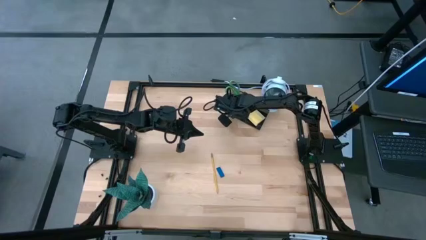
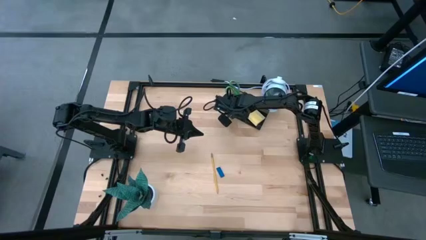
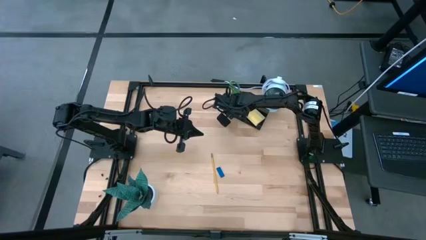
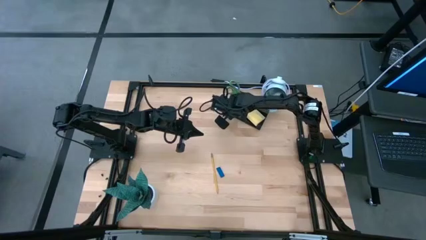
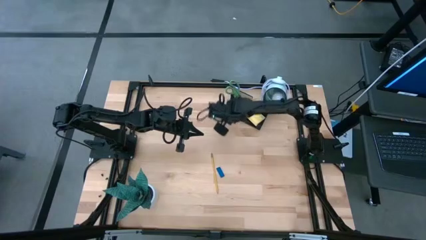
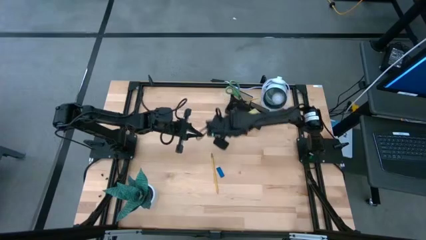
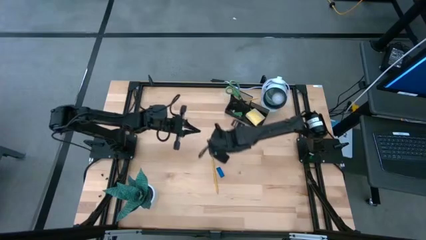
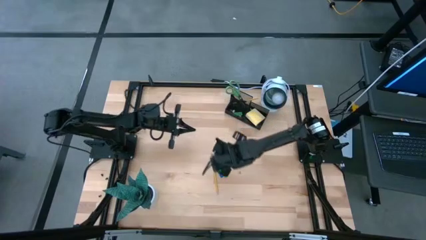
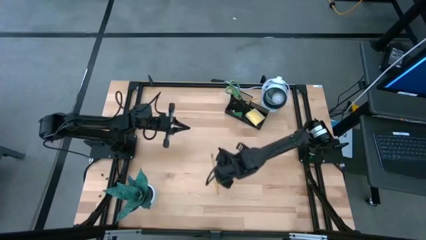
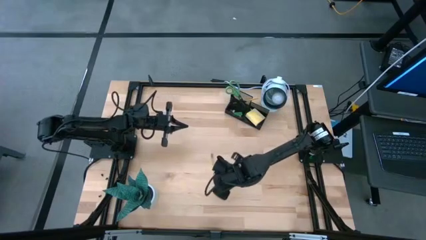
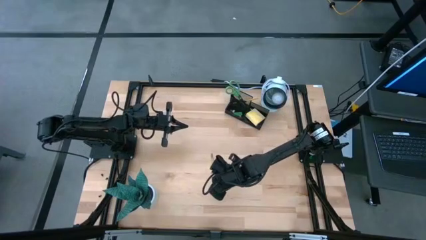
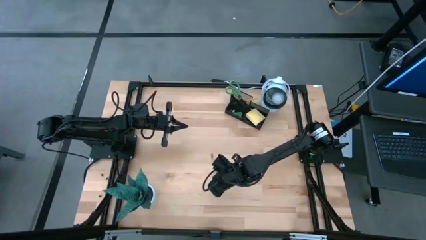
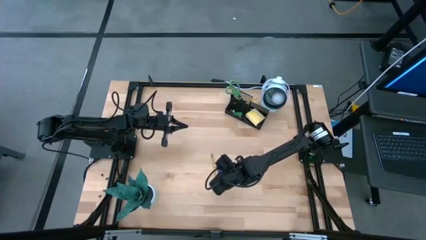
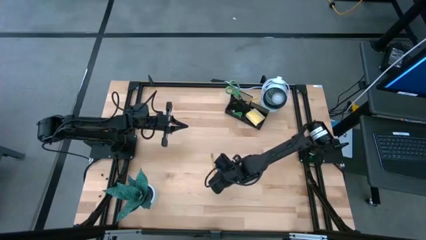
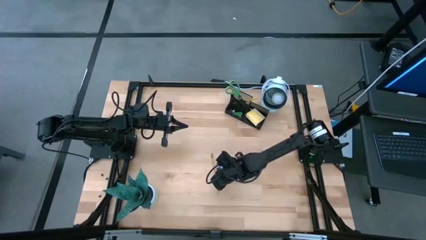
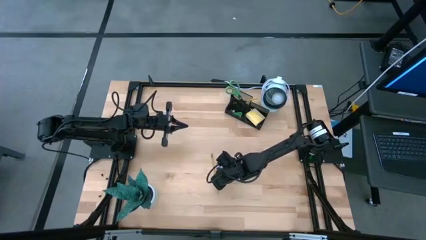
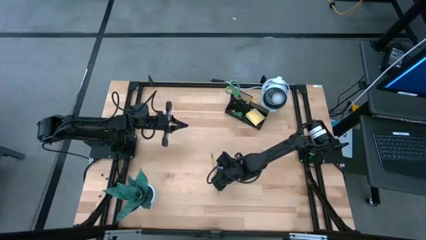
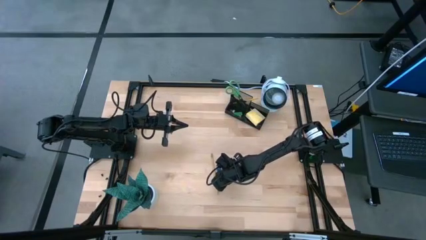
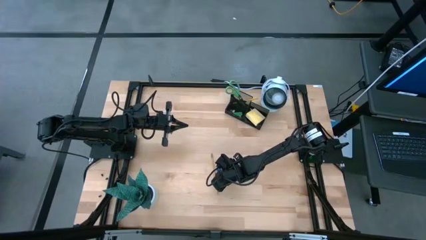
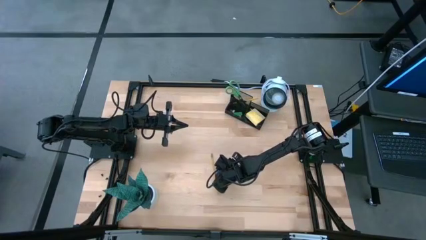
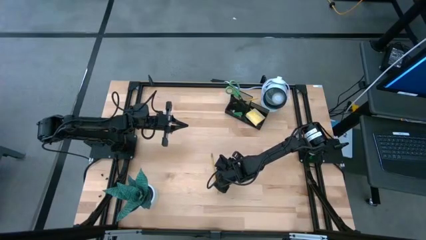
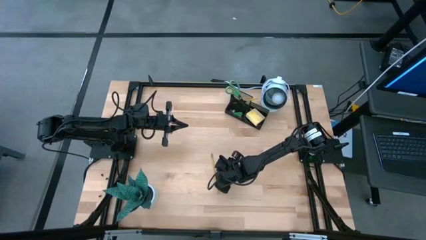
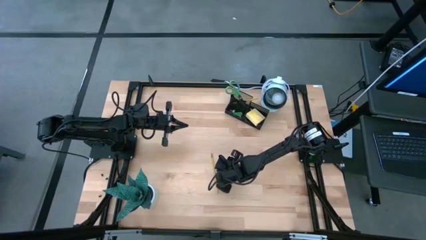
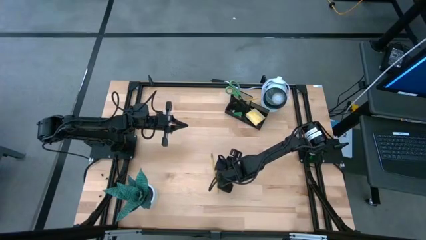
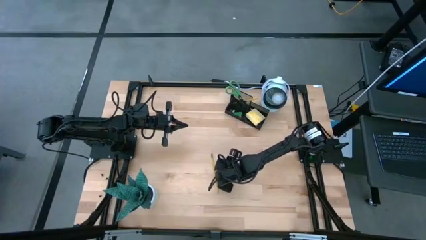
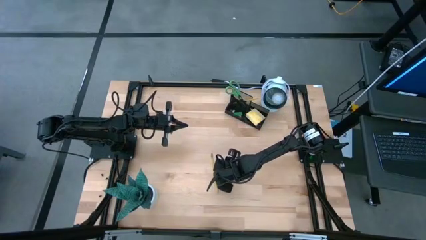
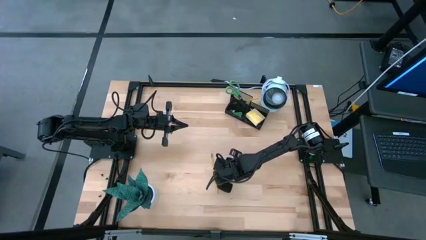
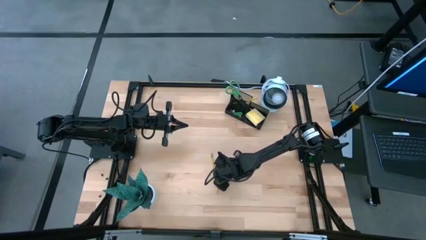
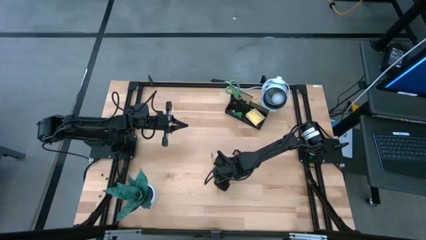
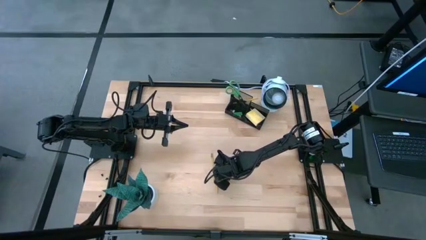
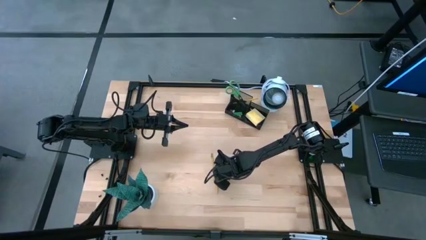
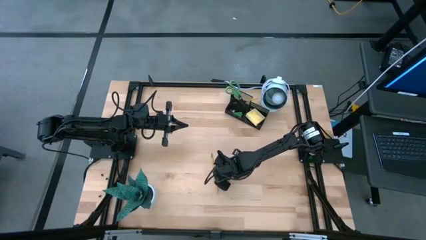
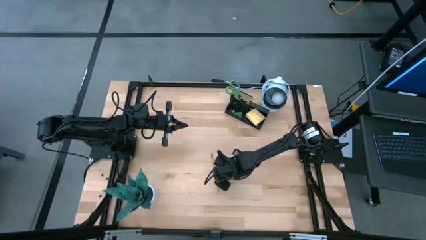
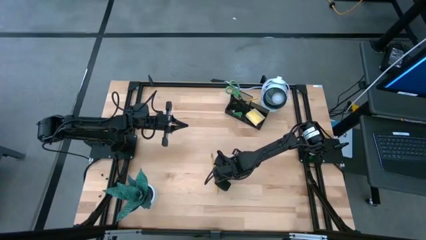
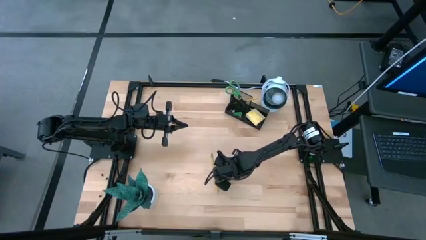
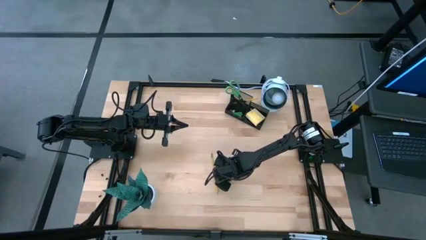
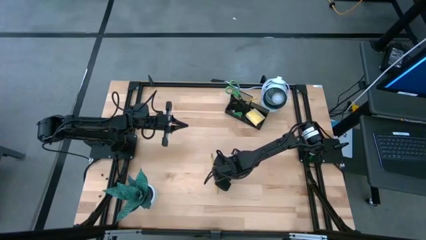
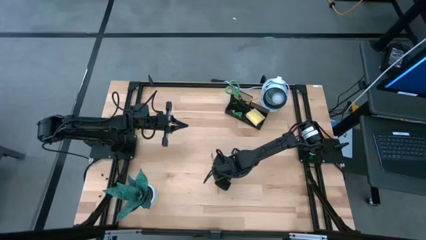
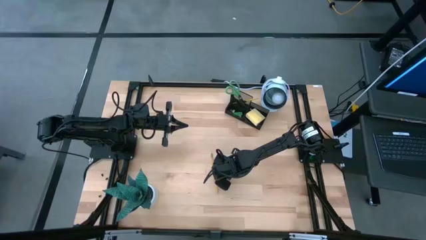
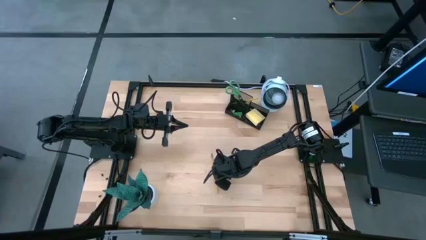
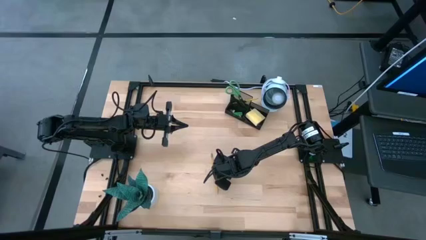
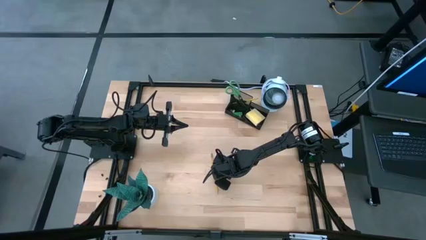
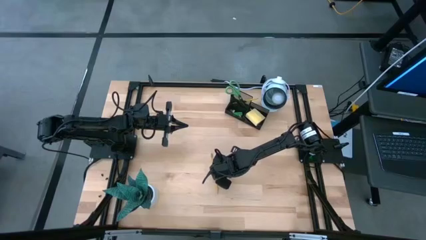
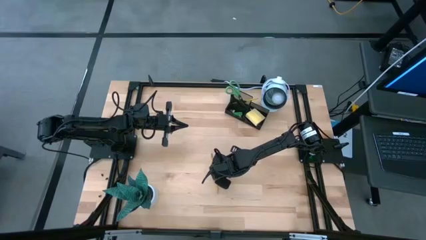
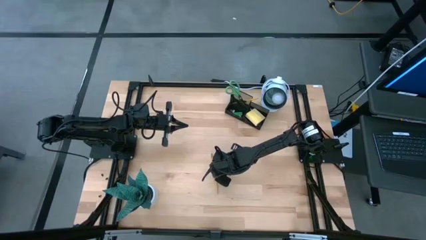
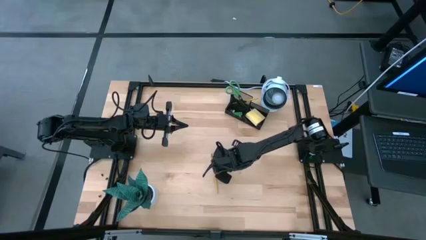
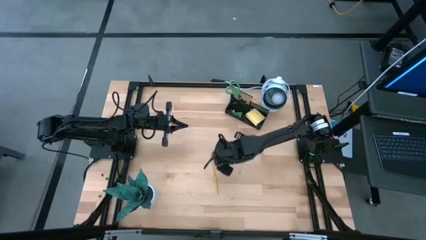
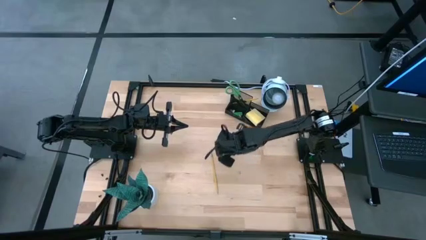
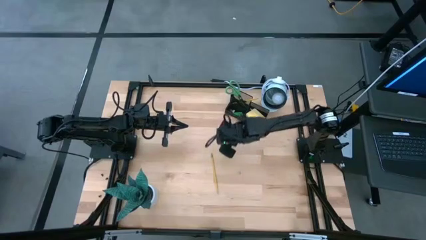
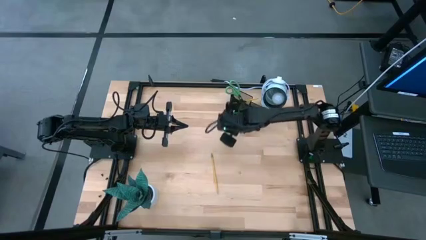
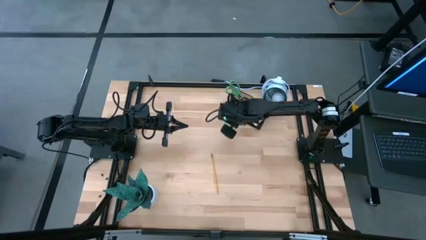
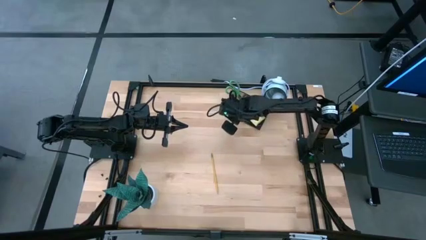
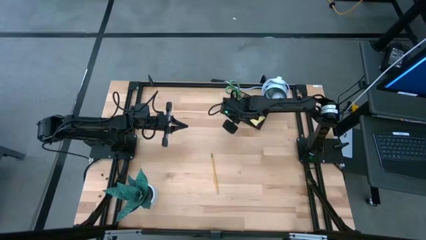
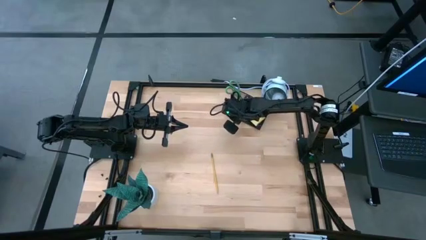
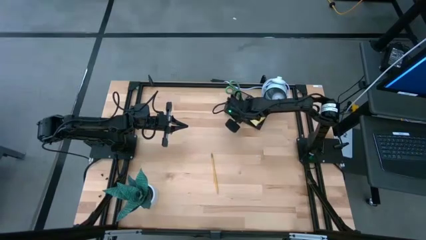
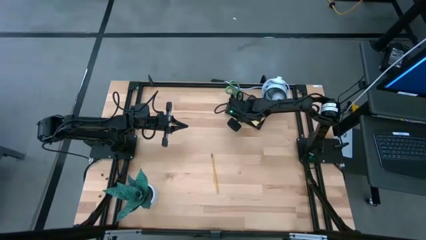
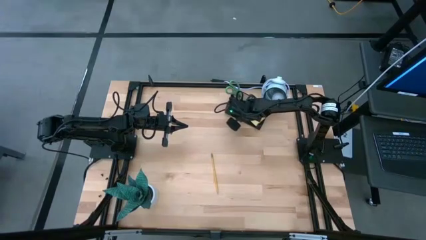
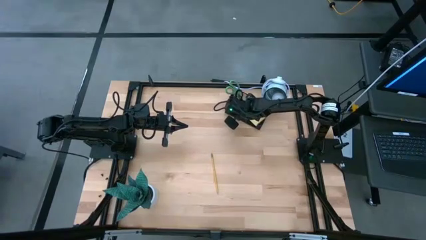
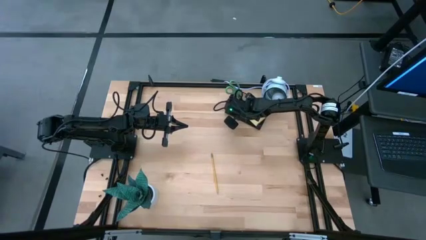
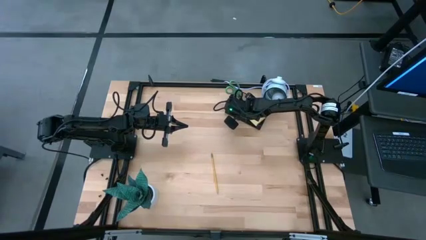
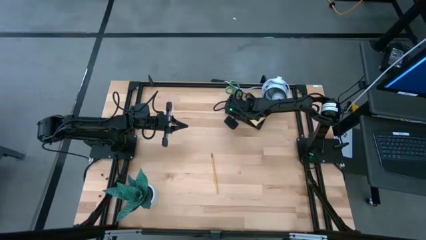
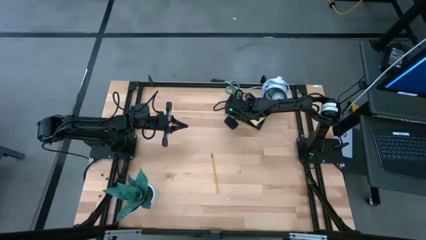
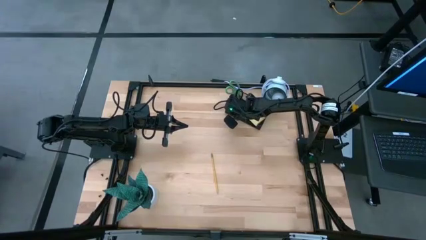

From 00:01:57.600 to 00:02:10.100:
Task: Pick and place office supplies into organizer
Put the blue eraser into the metal mesh desk organizer

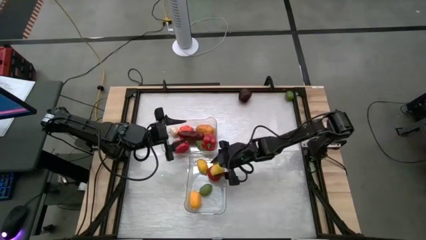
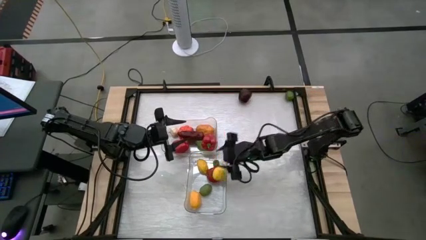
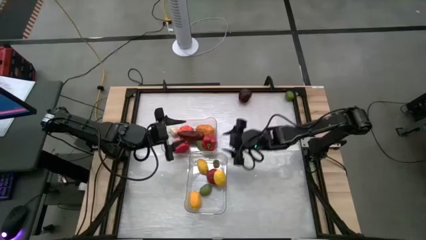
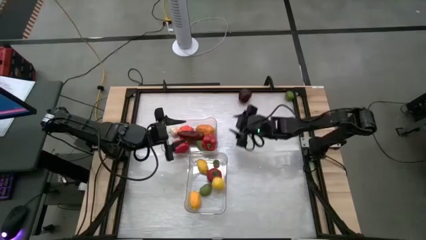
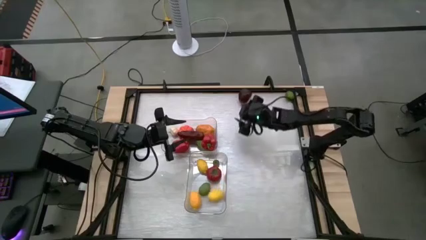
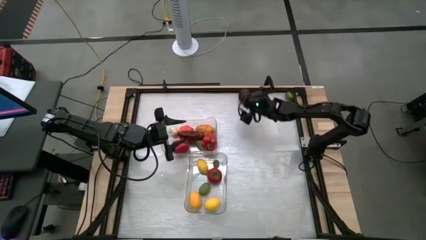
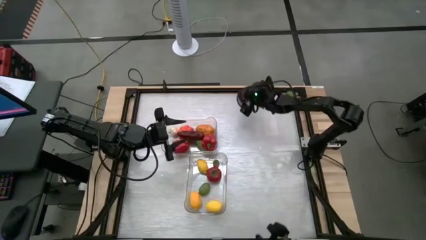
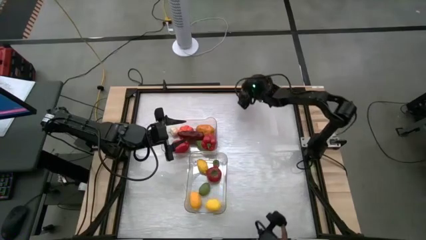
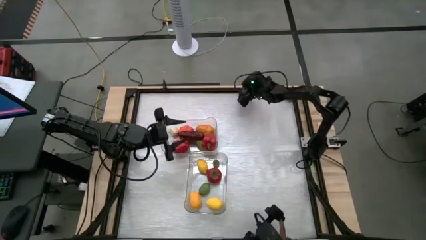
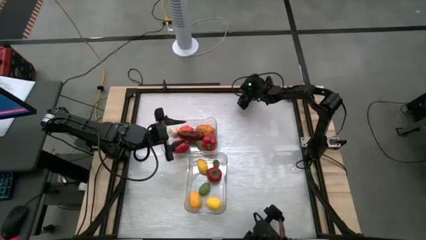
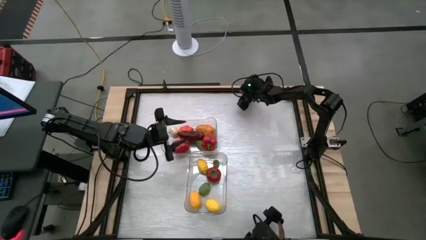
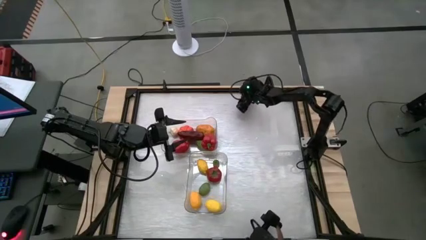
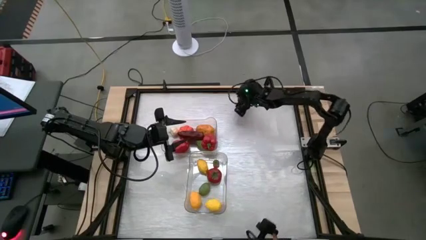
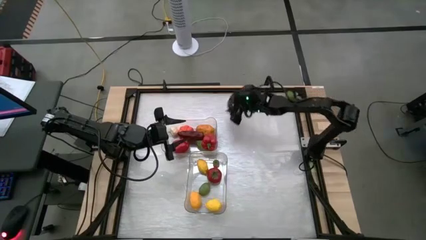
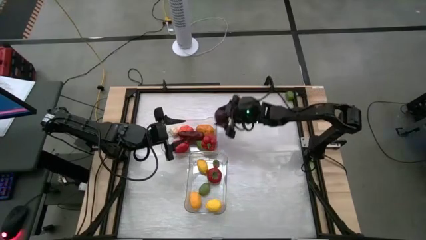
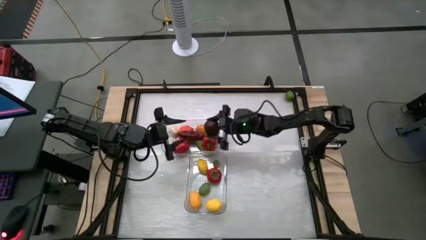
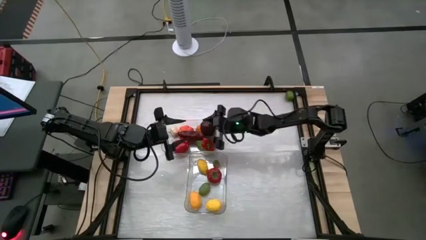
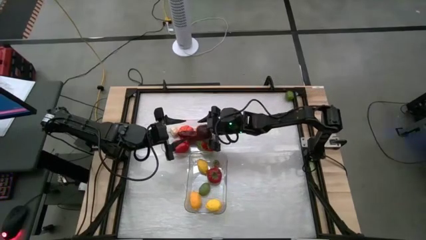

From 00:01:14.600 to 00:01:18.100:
Task: Sort produce into baskets
Put the apple into the top transparent bin

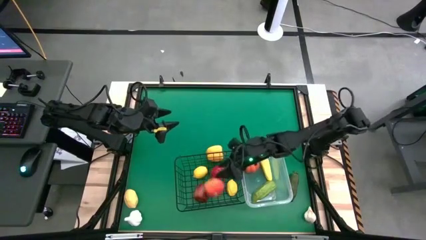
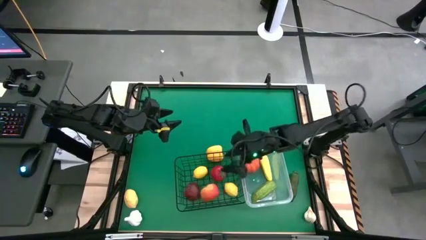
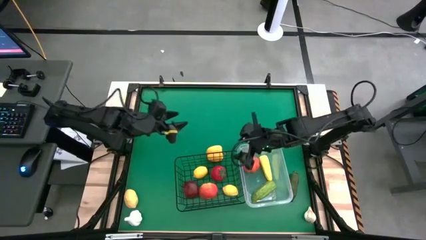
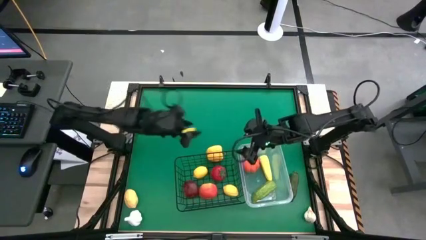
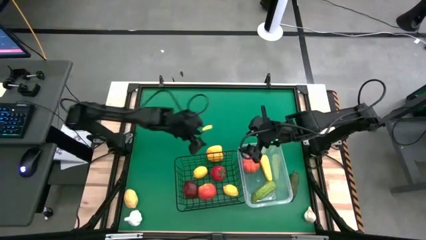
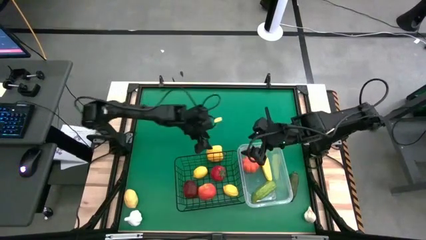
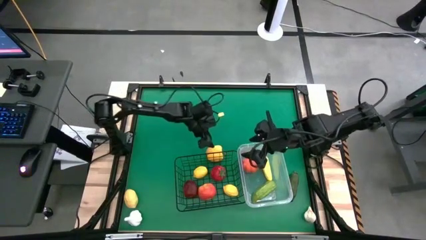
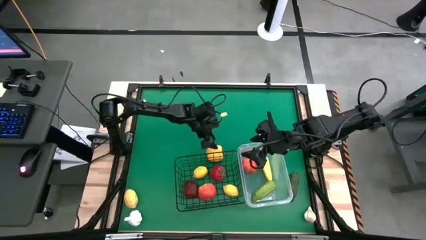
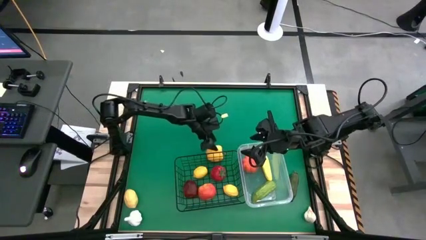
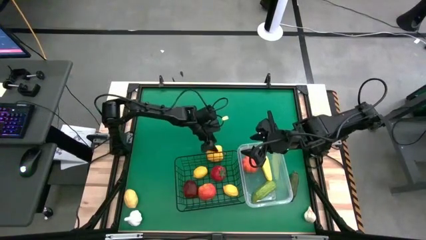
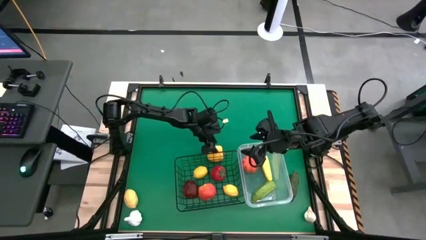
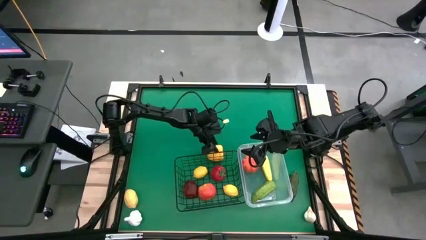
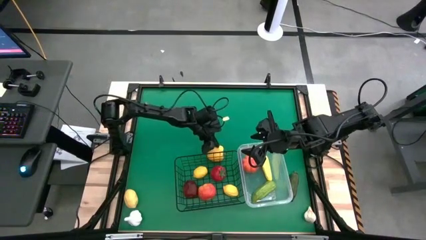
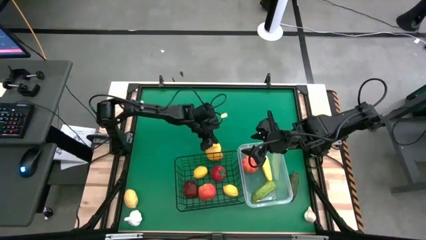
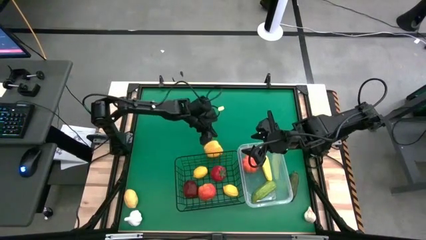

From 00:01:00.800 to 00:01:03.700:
Task: Sort produce into baskets
Put the bell pepper into the transparent bin
